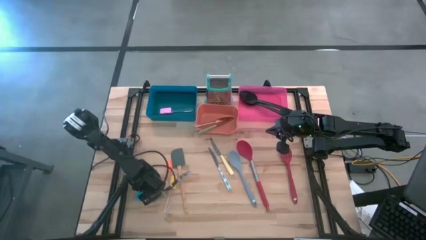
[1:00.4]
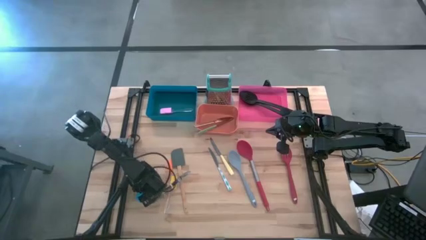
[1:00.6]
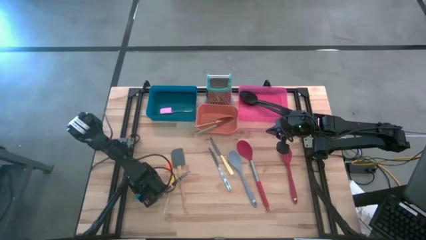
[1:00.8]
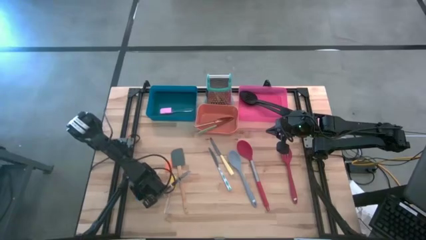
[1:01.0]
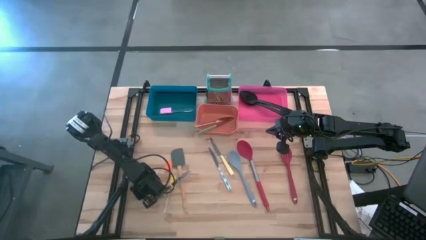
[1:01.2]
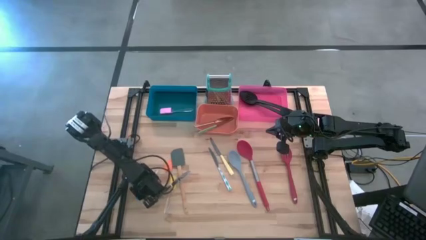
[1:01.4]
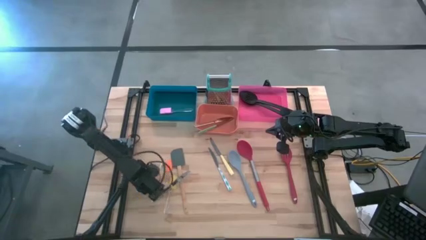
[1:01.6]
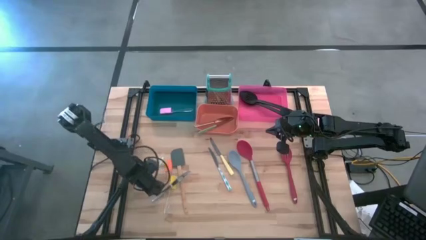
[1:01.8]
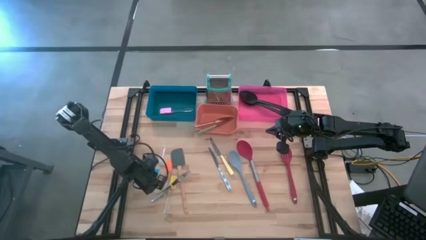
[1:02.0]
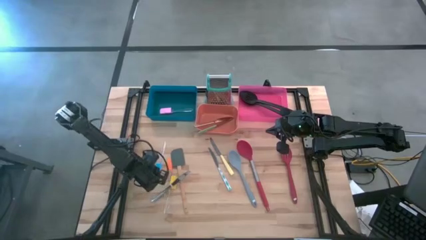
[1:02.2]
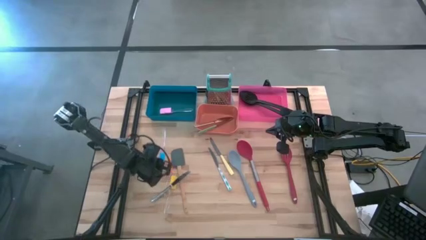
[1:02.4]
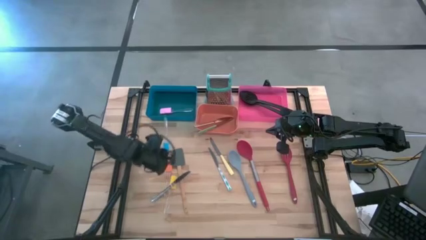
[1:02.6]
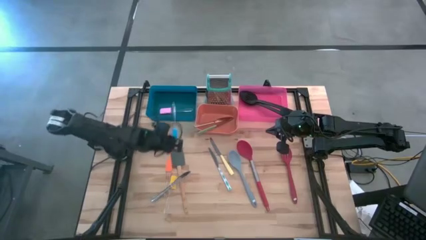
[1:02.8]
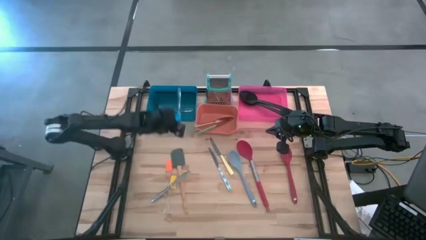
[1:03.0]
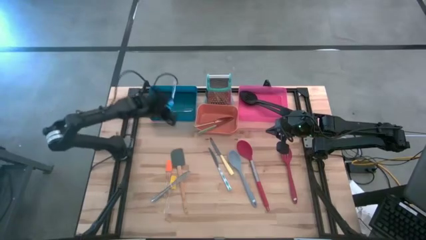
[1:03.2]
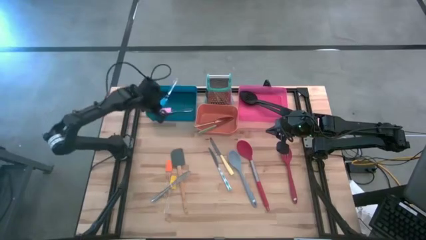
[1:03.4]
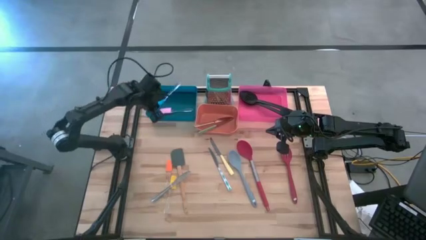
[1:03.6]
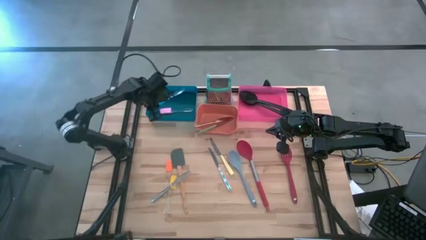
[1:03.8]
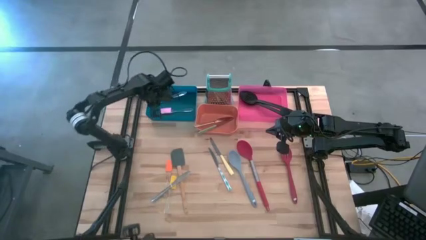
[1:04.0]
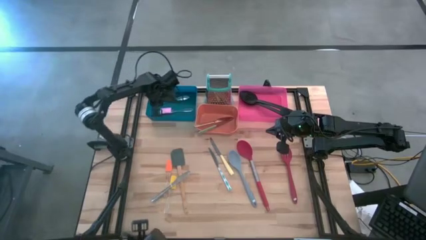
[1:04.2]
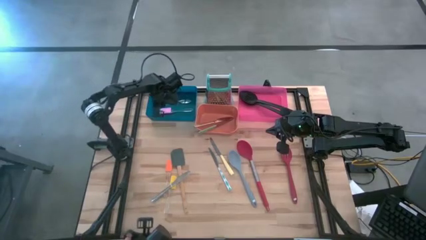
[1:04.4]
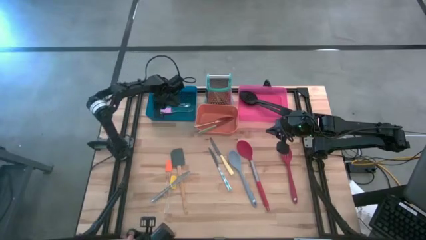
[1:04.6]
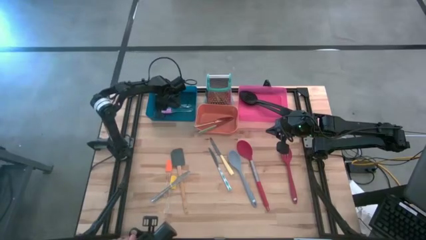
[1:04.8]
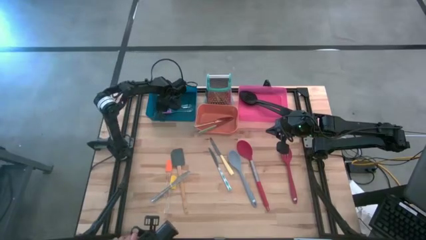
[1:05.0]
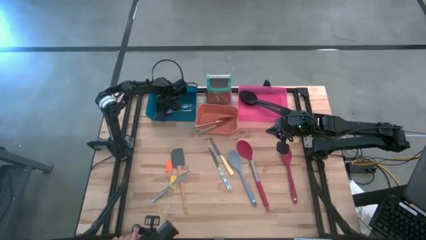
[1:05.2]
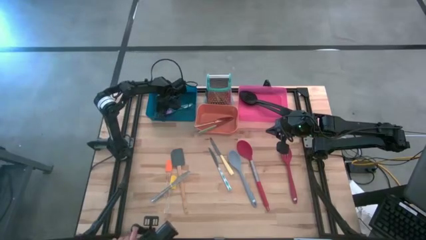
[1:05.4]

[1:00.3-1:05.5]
Task: Pick & Place Kitchen Items
Put the blue spatula into the blue bin

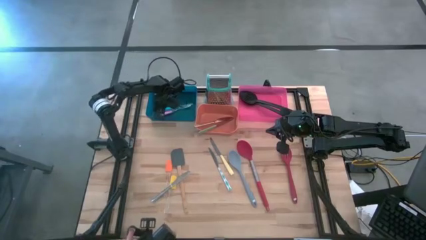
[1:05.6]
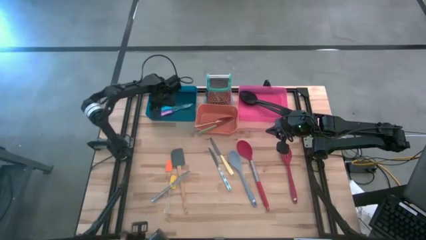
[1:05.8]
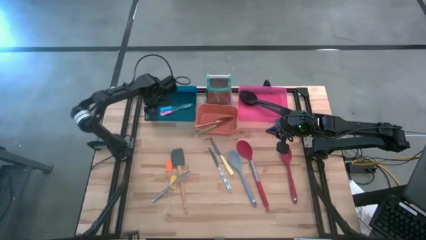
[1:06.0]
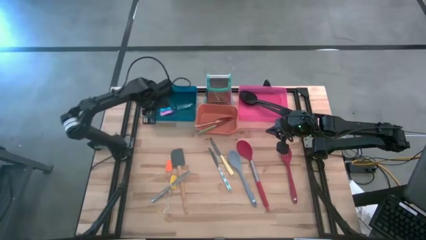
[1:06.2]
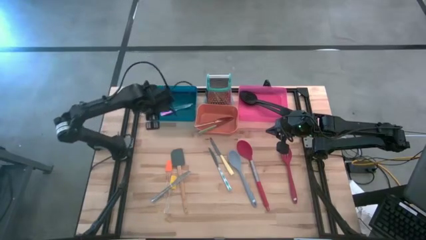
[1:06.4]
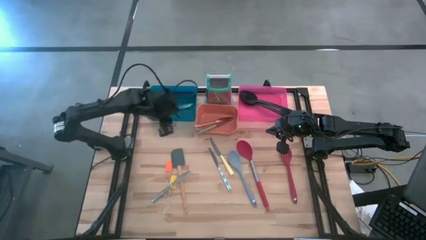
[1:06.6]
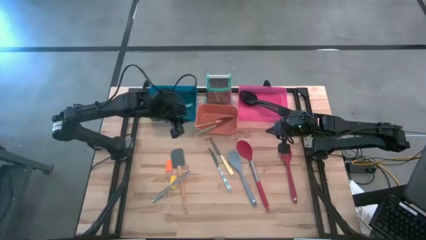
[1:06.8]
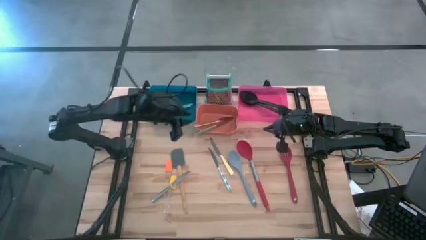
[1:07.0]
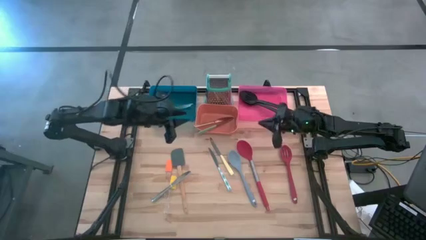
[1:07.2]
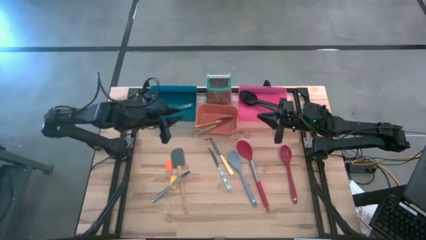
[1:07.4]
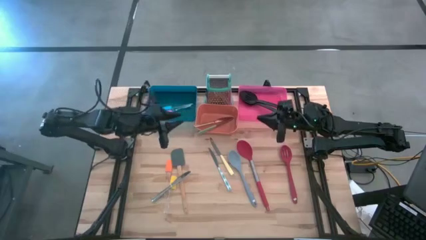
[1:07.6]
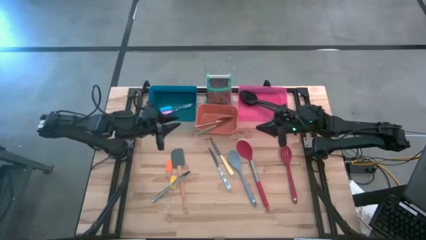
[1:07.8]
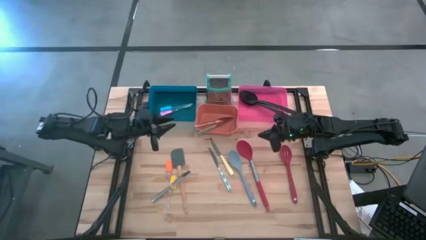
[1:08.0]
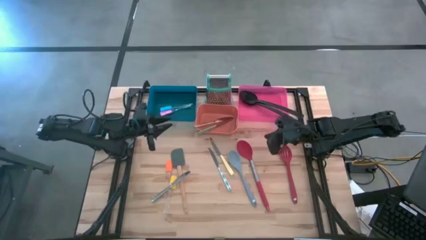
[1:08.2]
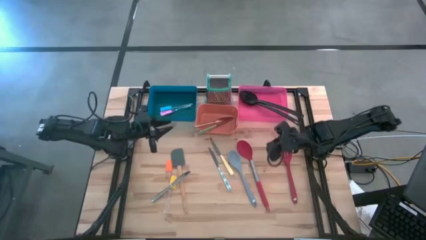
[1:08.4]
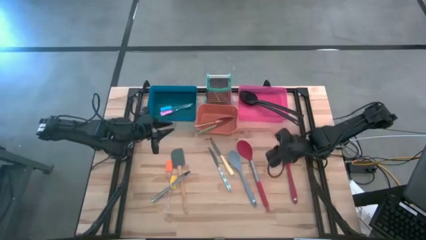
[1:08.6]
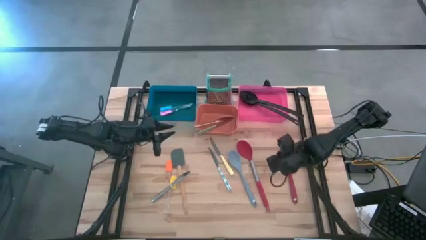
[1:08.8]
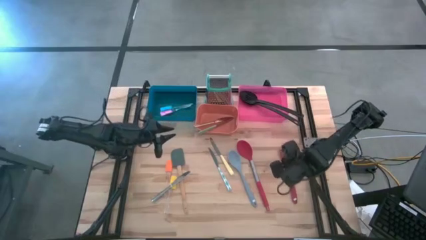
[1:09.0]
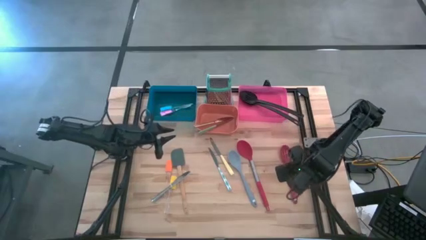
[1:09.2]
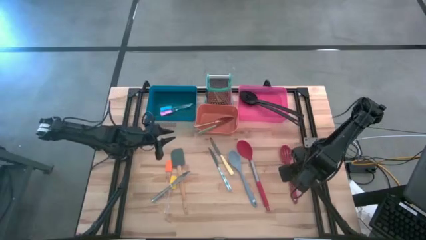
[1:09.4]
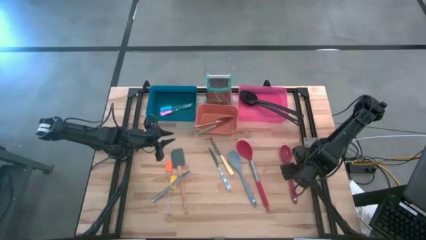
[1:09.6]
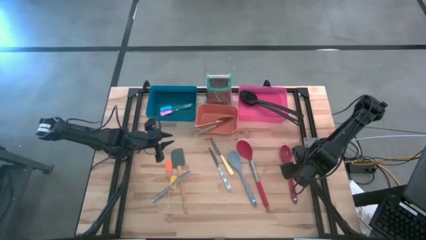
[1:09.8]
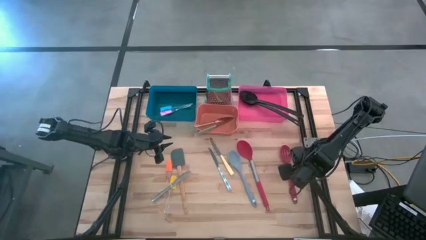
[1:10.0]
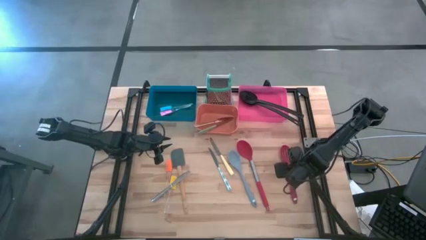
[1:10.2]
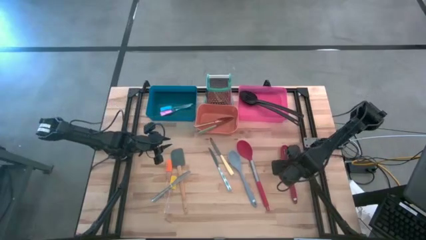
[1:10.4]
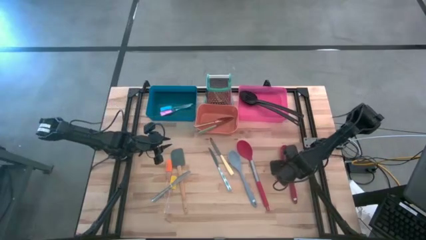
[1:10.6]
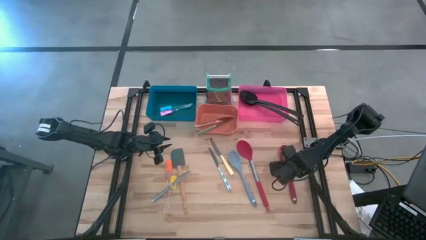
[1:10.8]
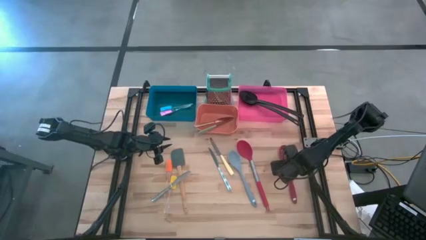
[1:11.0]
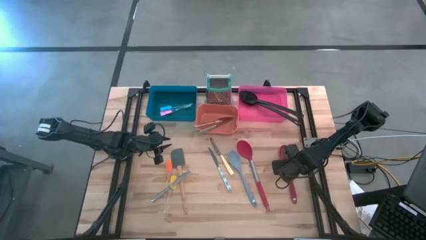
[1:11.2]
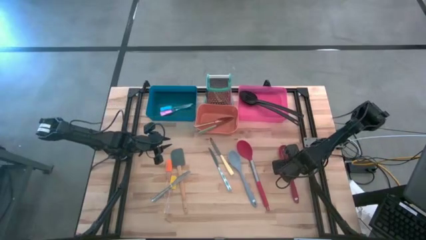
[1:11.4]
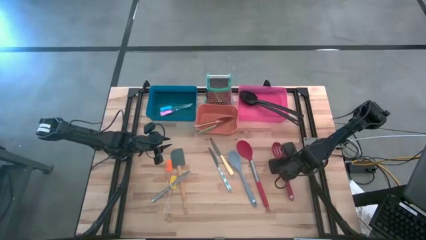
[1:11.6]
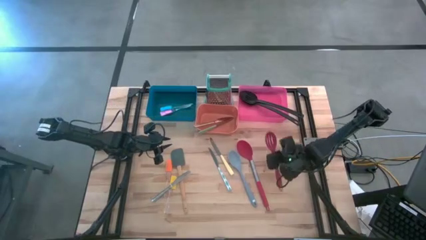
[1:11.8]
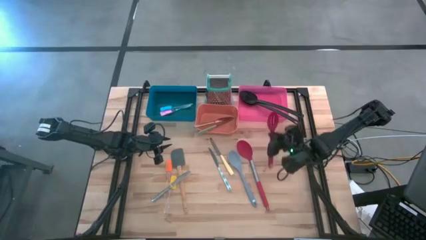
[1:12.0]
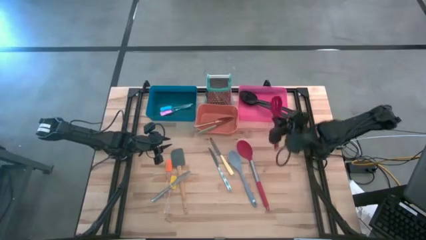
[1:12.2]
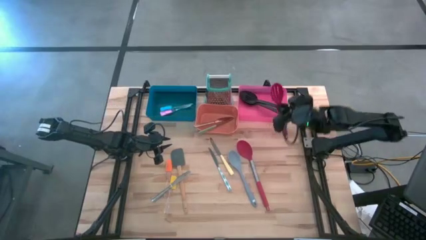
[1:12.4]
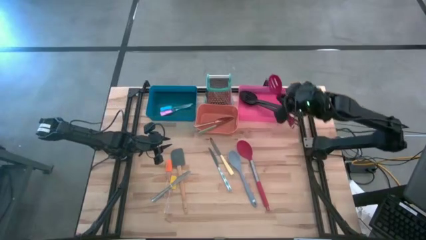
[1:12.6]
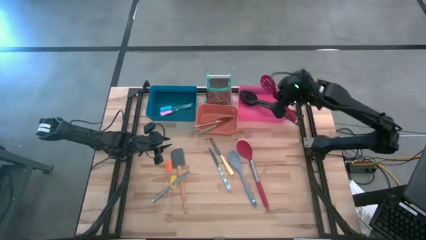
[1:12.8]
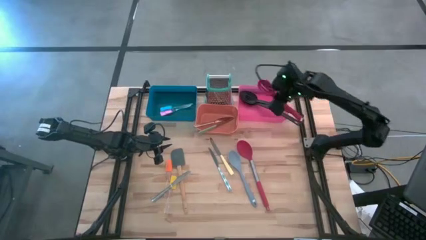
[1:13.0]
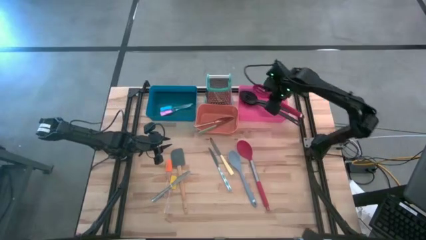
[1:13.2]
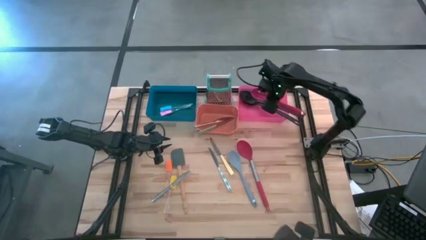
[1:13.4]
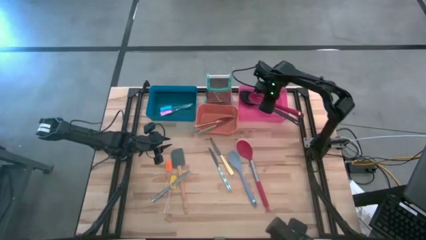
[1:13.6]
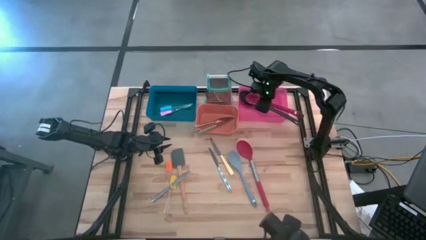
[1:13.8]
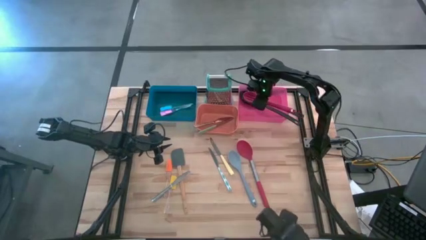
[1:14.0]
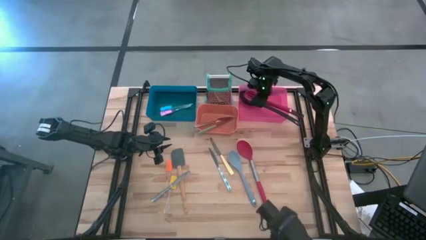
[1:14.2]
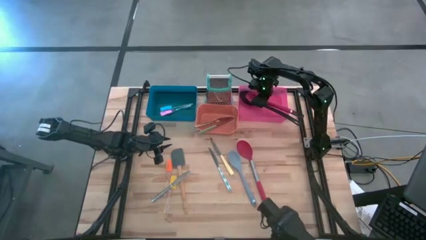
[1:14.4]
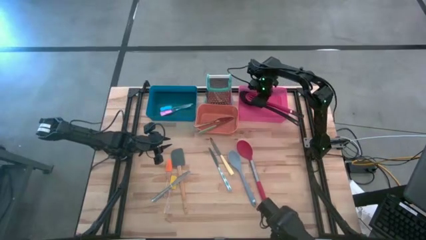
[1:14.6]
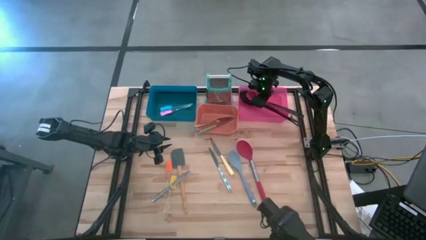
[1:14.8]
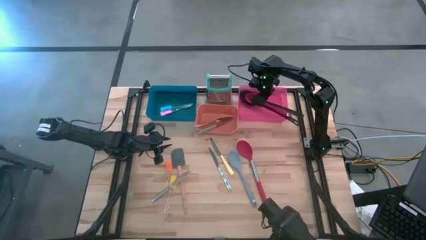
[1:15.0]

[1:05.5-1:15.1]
Put the red slotted ladle scoop into the pink bin

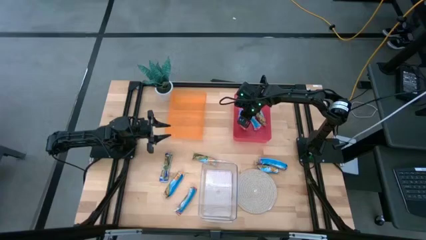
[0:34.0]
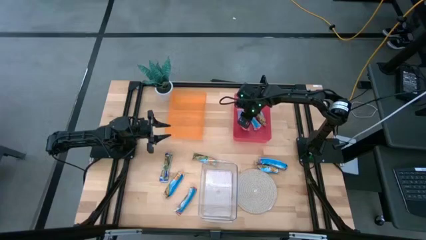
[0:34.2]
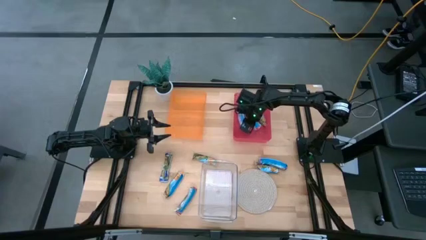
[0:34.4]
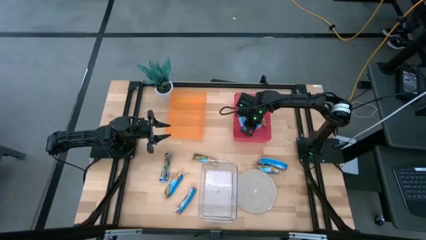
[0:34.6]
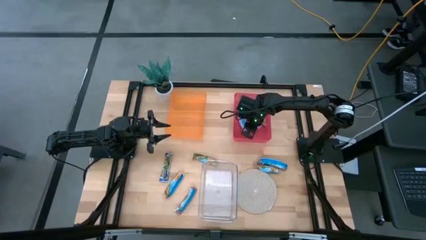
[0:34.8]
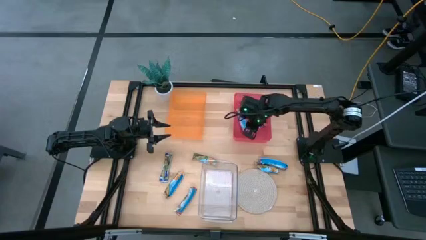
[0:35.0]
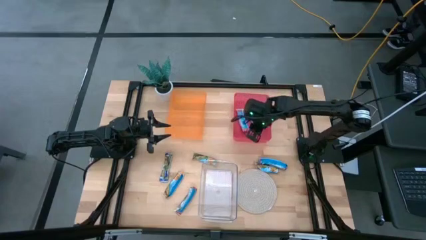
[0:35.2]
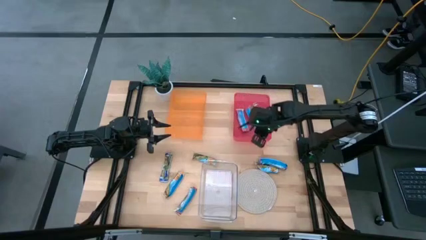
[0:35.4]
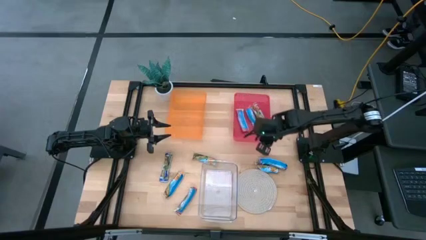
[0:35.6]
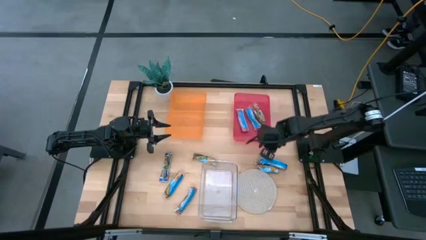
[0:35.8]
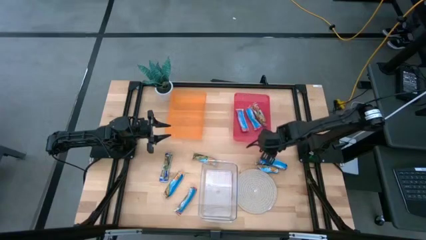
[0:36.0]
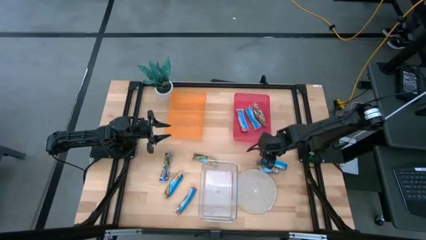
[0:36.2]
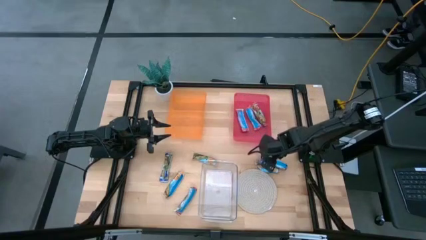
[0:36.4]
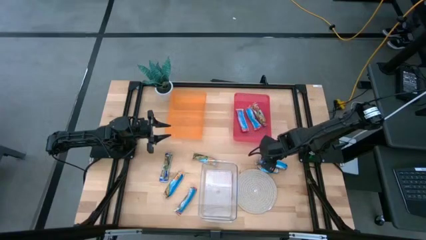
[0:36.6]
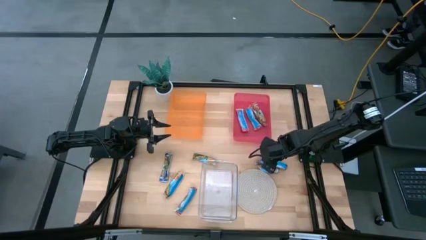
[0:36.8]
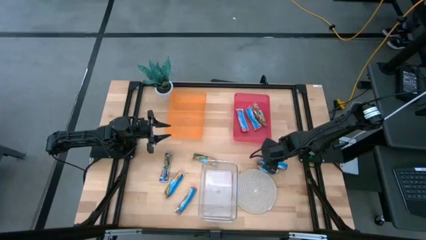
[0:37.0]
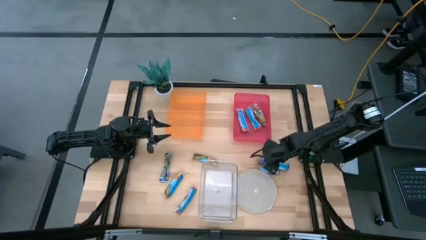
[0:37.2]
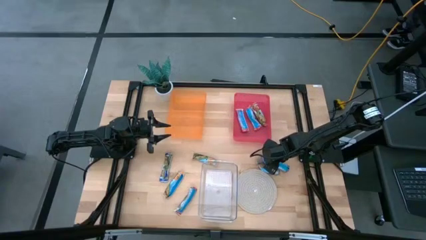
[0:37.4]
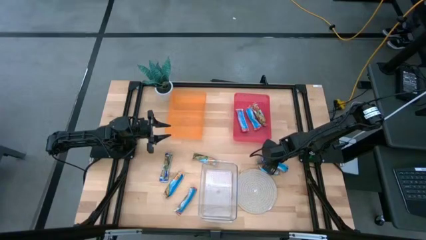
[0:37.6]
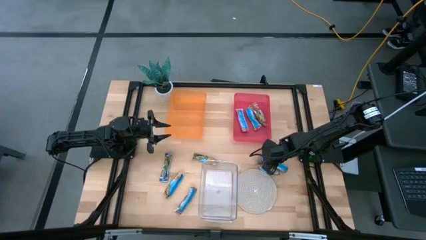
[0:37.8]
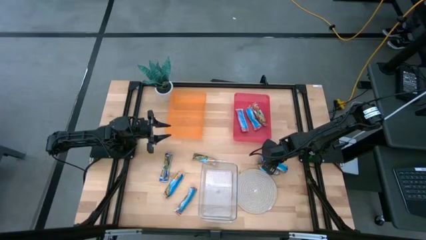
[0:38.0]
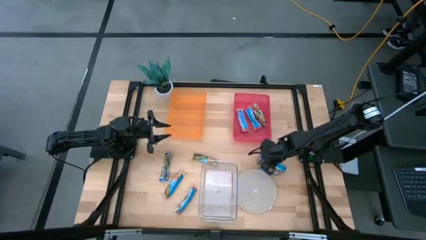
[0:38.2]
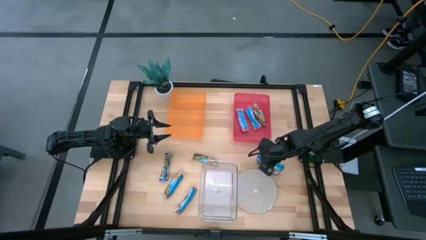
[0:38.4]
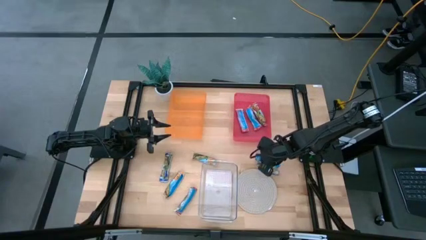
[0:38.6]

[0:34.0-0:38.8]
Task: Pick and place Granola Bars by type
Put the blue granola bar into the transparent bin
